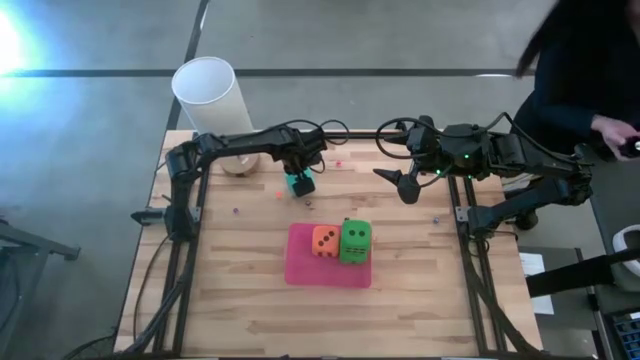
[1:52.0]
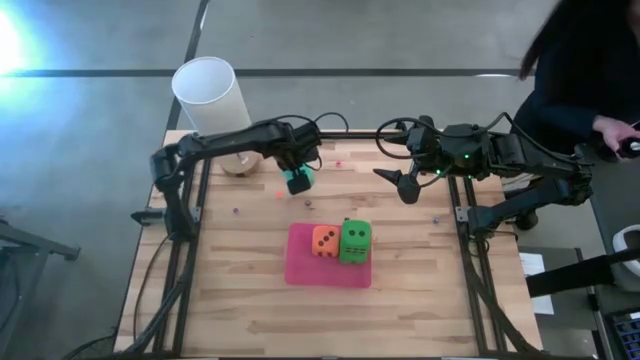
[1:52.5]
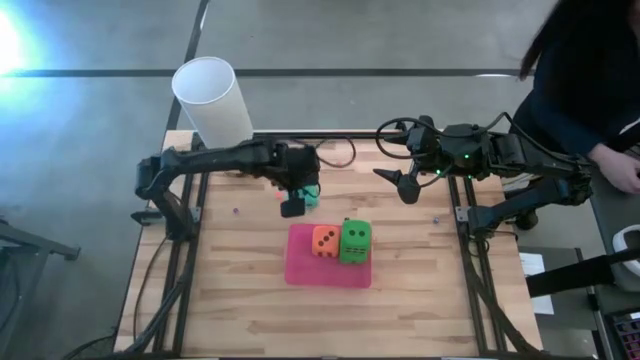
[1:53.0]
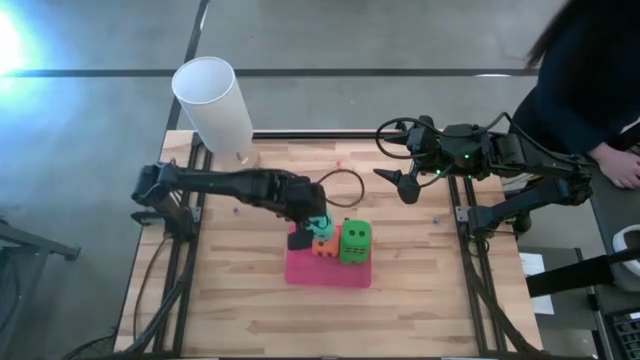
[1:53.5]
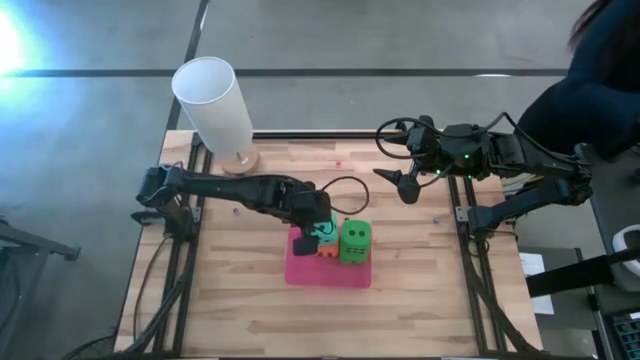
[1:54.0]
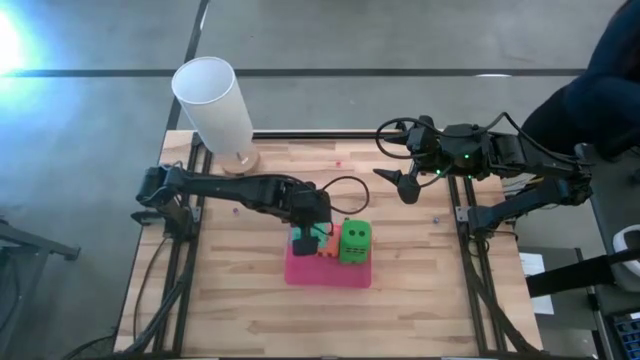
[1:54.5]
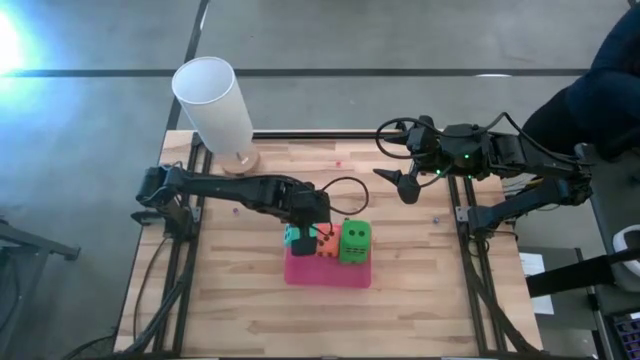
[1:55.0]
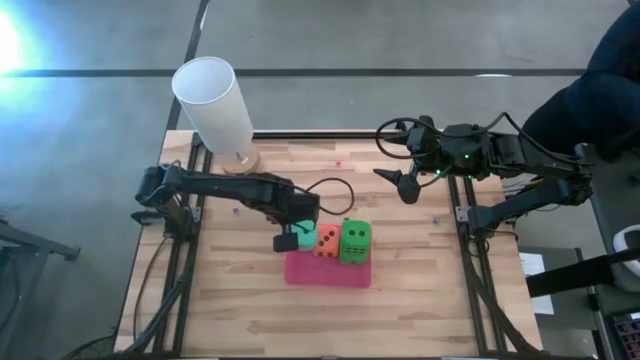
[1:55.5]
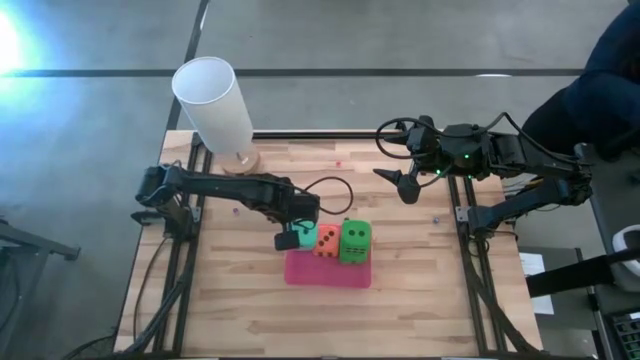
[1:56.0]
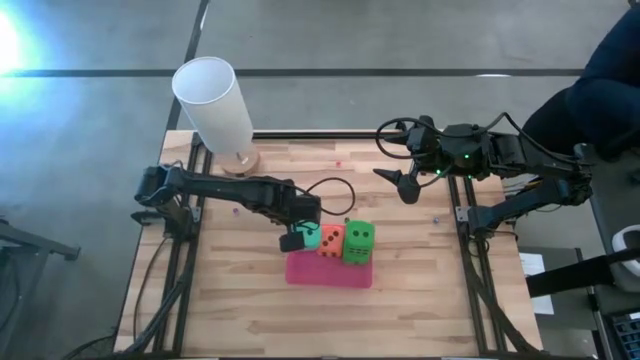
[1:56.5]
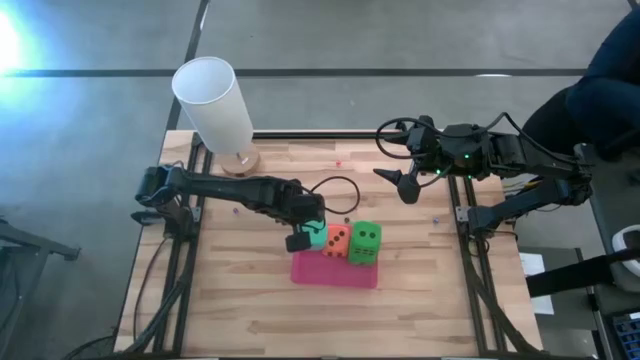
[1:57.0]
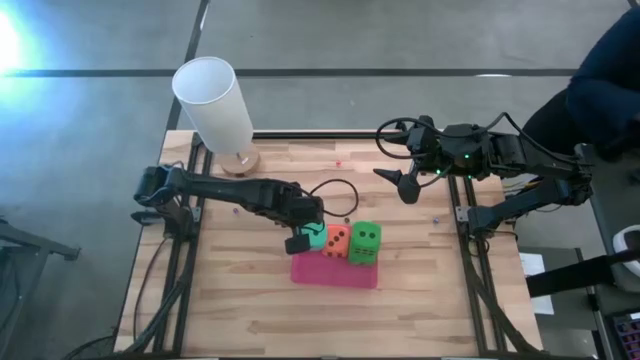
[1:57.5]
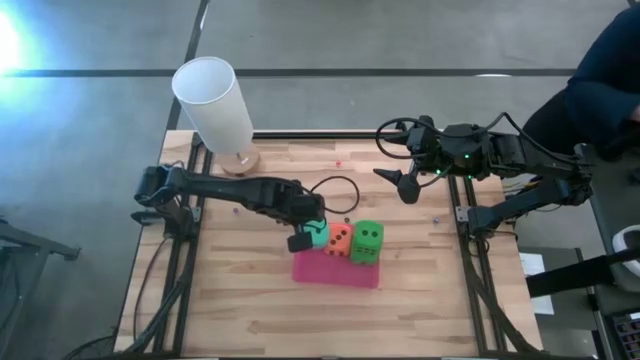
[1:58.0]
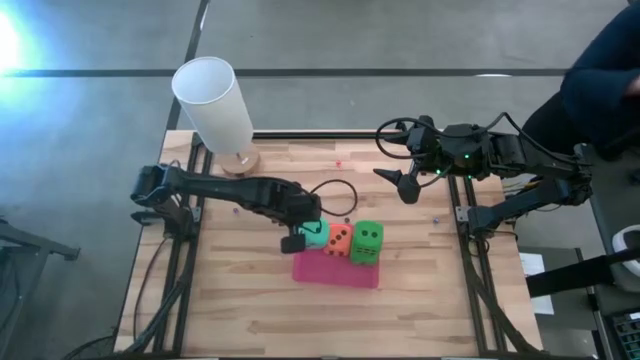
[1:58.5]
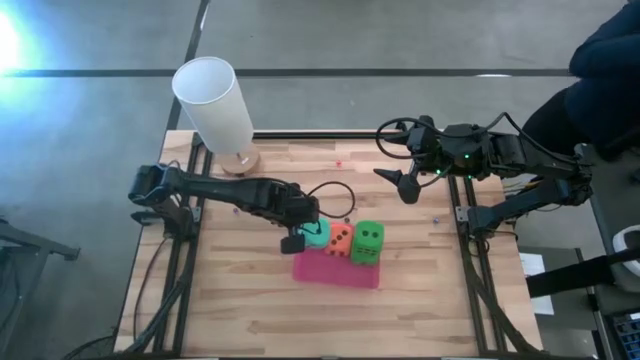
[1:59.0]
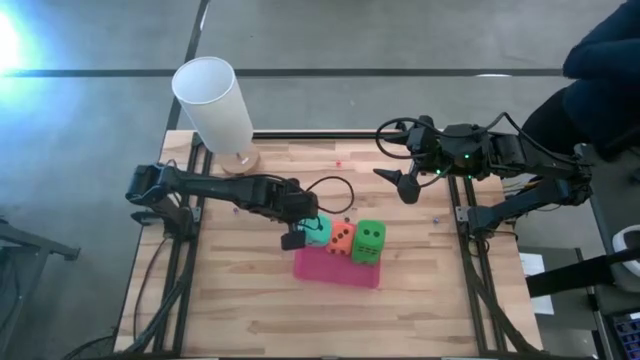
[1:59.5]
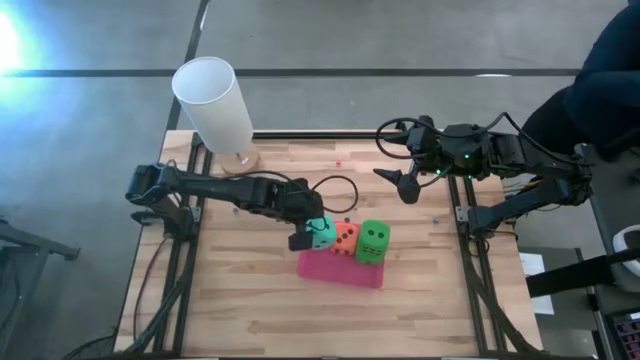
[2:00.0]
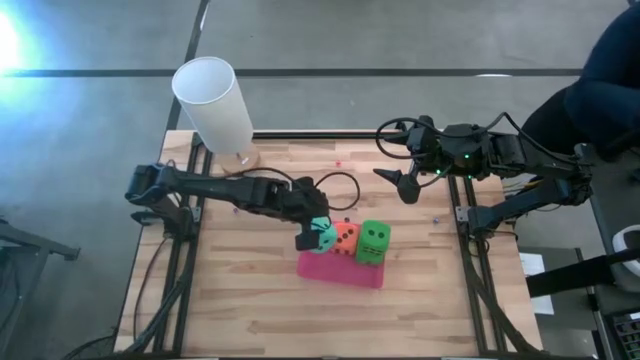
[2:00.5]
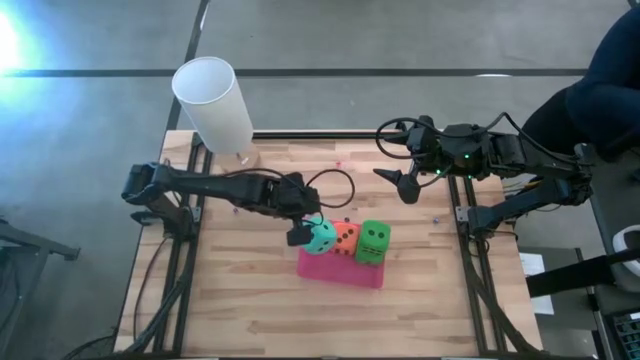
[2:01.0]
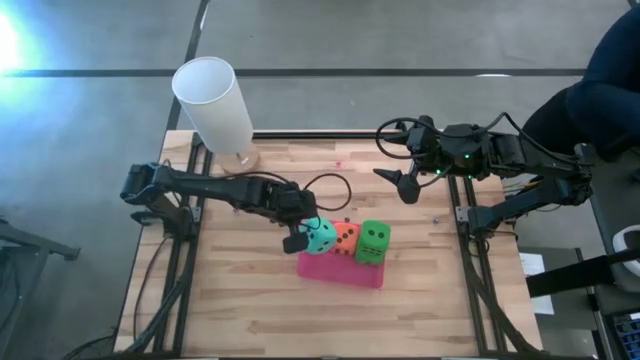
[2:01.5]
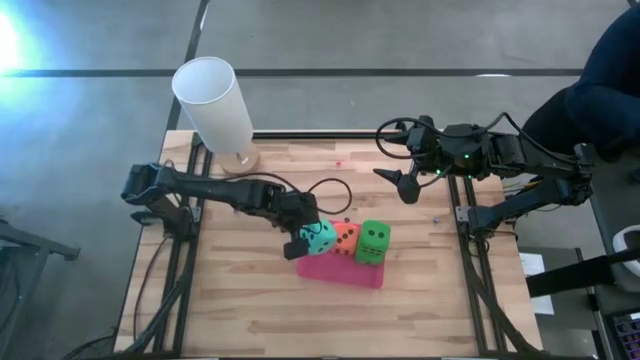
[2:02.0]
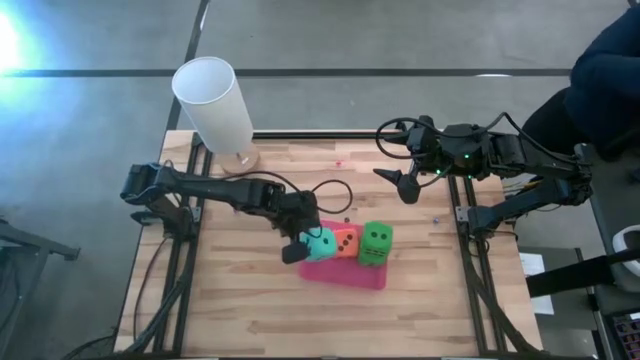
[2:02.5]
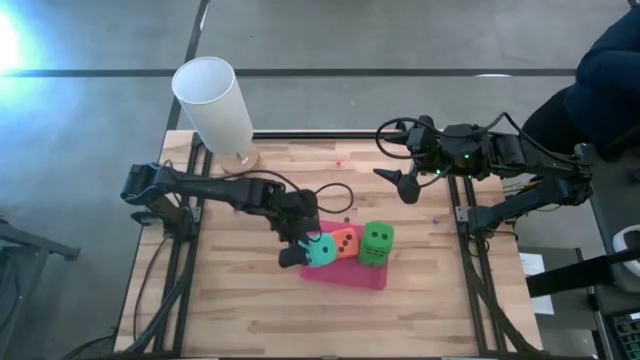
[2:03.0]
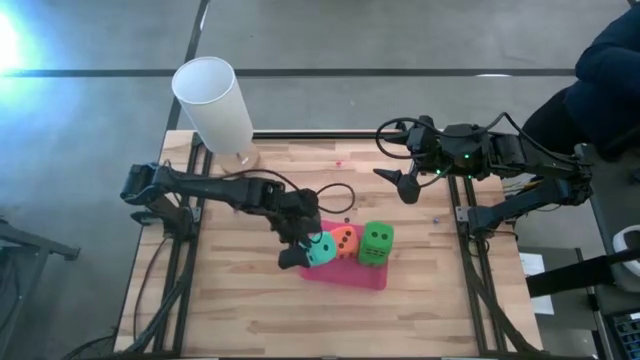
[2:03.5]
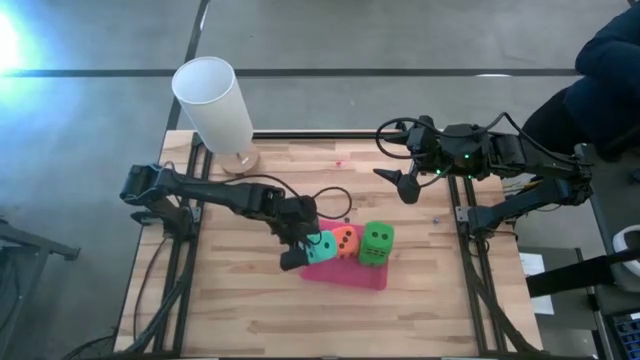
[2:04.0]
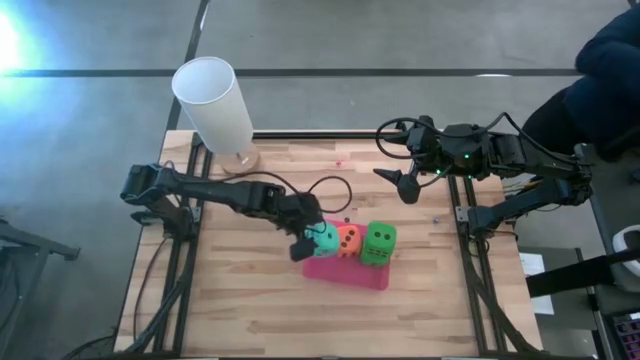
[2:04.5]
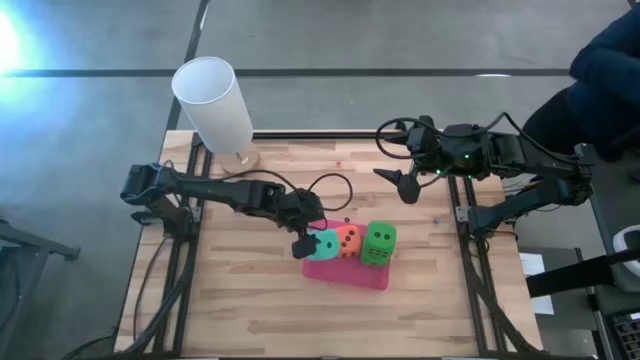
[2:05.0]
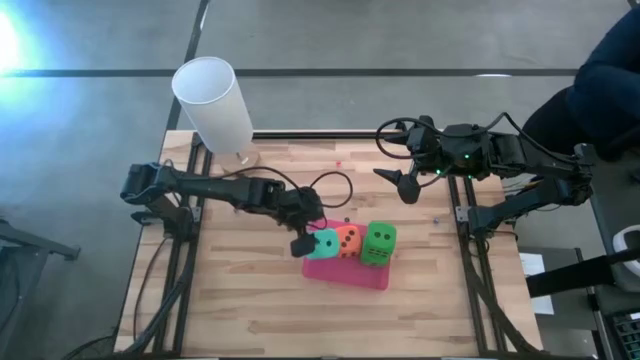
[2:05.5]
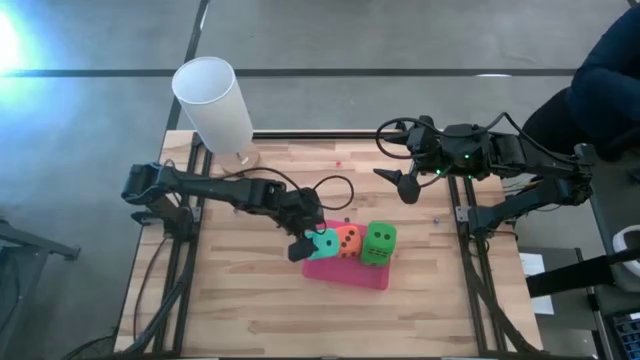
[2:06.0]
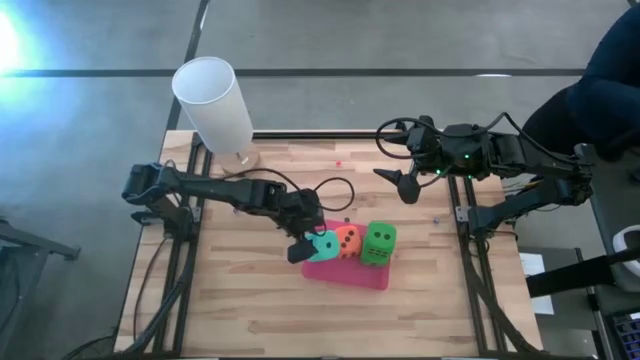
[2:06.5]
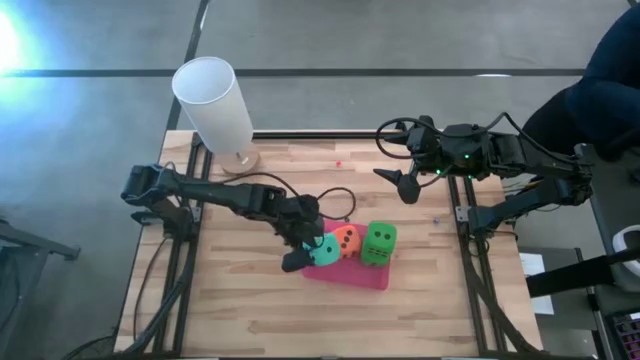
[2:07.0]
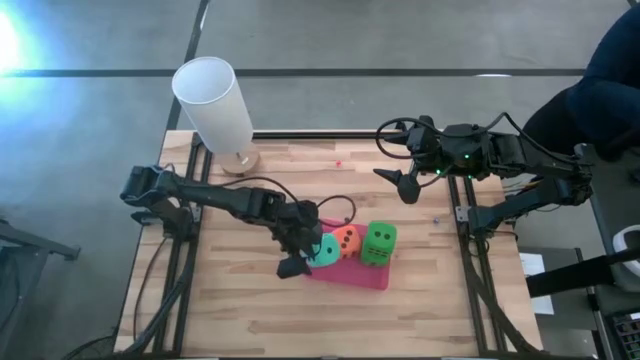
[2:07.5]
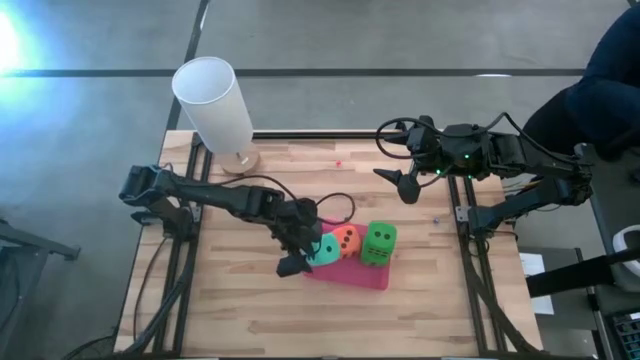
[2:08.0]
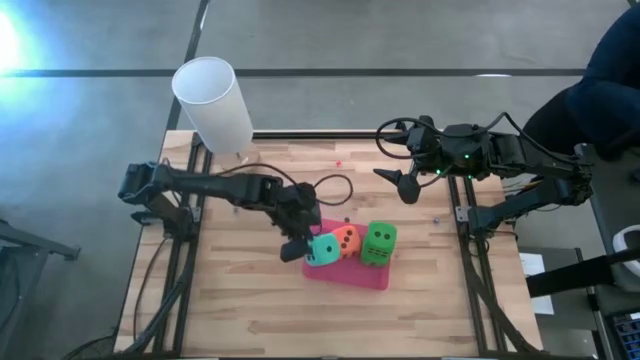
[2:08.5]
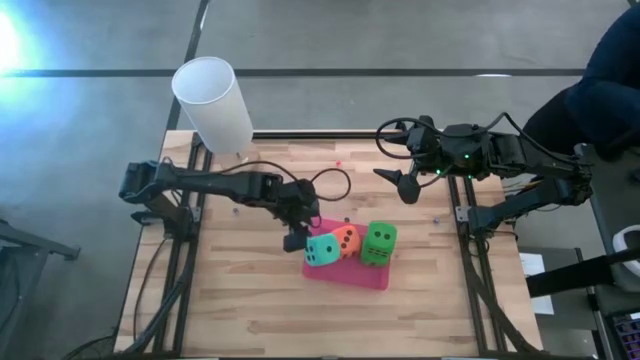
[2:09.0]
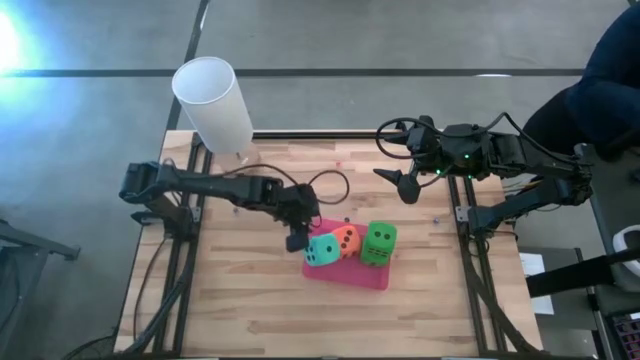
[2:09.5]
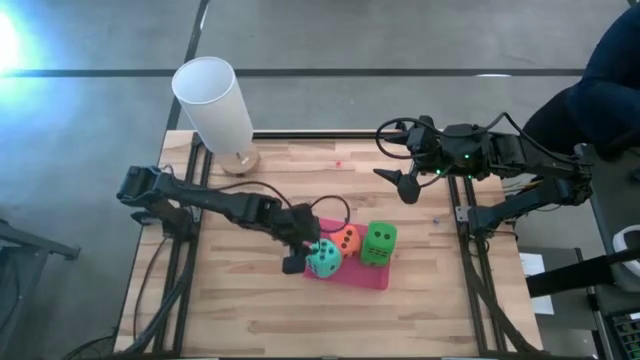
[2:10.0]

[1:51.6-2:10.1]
Task: Pick & Place Dice
Put the large blue dice into the pink bin

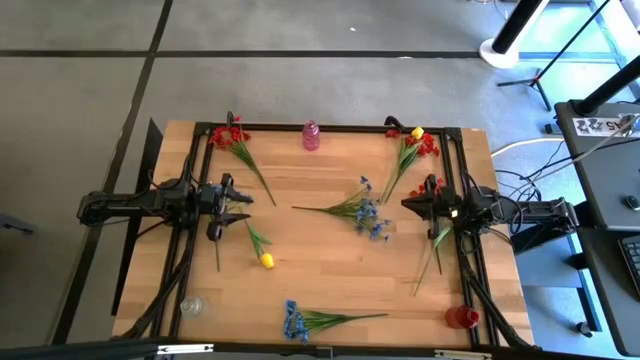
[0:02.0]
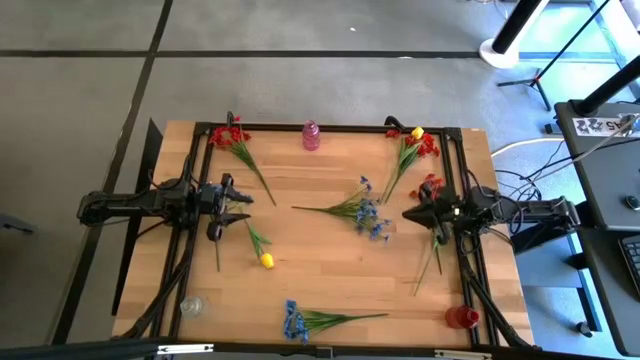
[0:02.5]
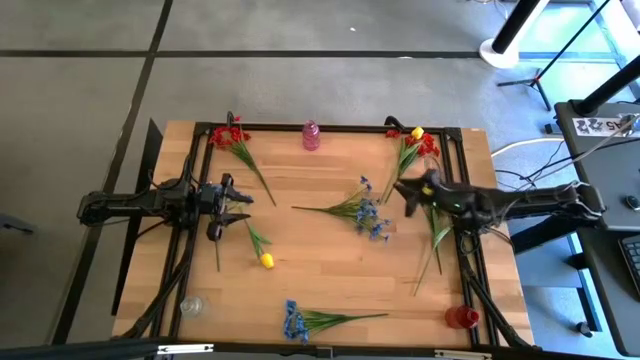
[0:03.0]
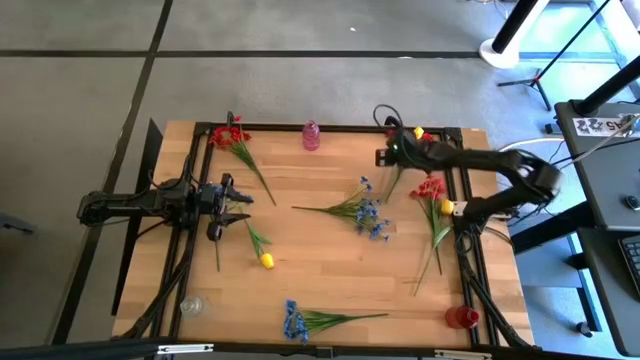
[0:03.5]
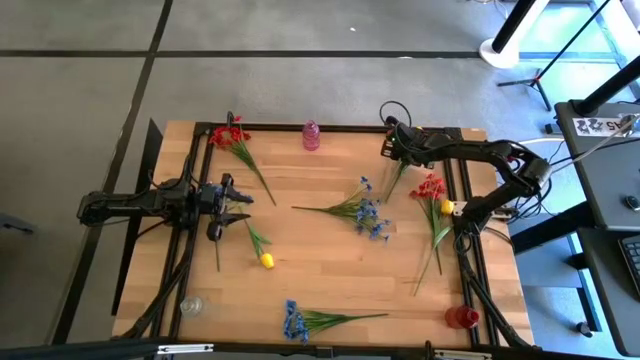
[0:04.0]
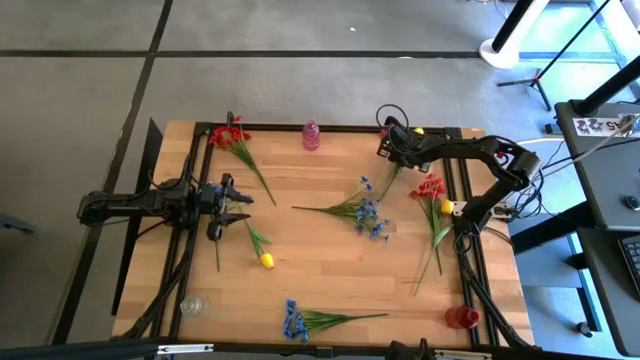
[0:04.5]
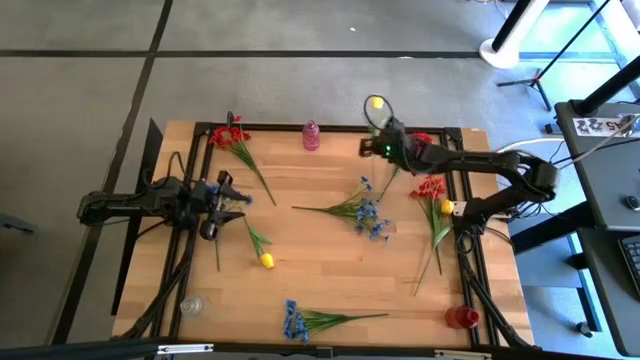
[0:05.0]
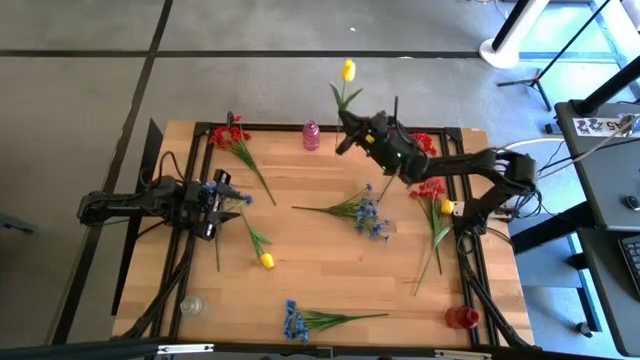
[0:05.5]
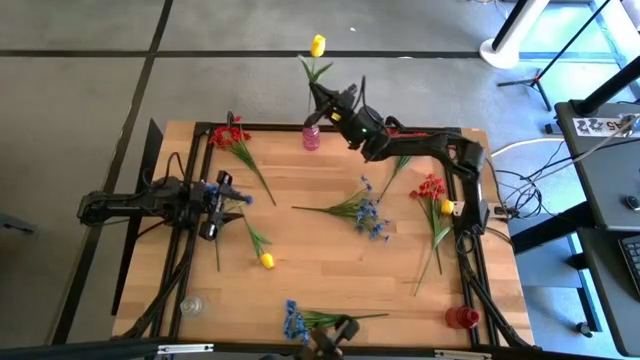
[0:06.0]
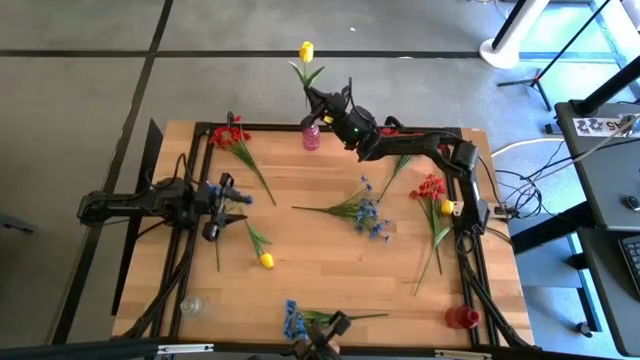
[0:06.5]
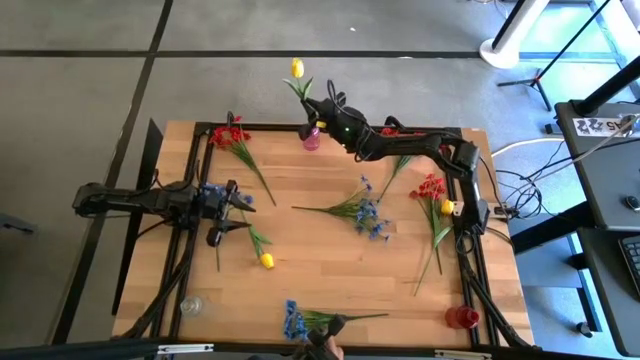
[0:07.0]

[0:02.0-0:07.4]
Task: Sort flowers into vase by color
Put the top yellow flower into the pink vase
